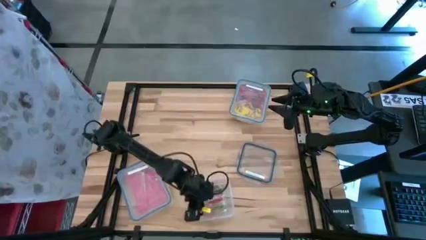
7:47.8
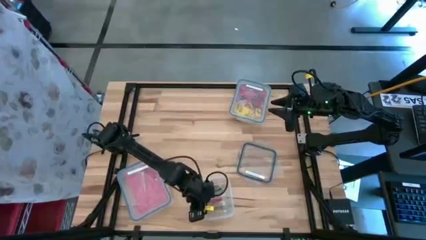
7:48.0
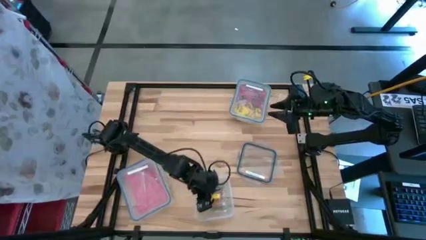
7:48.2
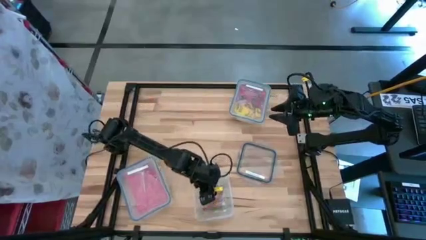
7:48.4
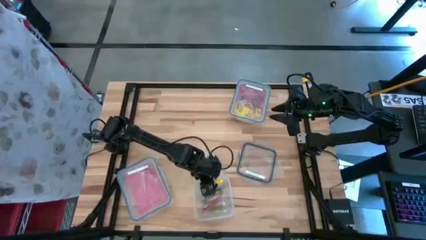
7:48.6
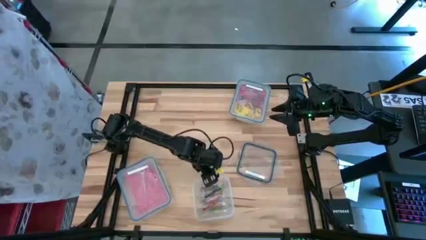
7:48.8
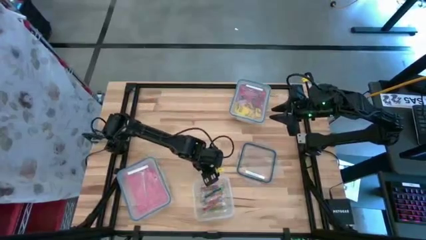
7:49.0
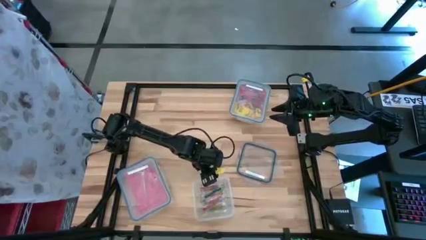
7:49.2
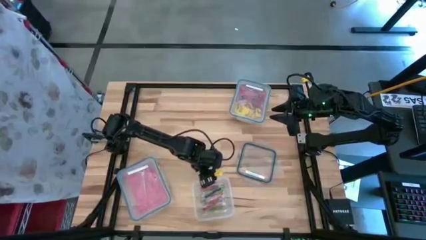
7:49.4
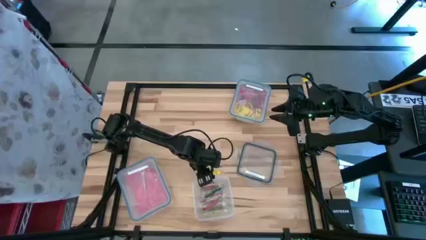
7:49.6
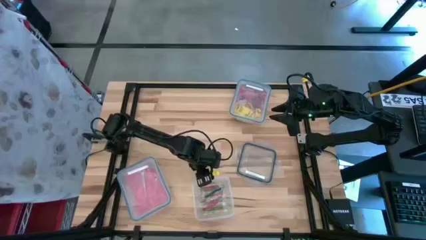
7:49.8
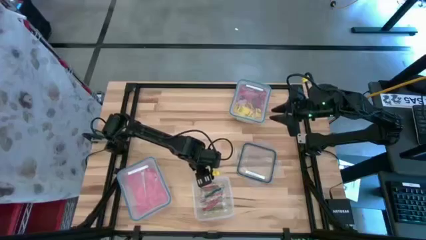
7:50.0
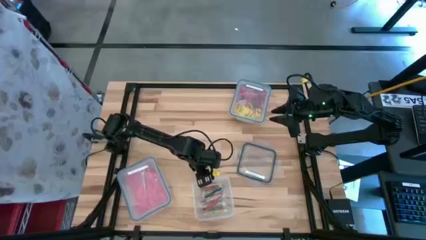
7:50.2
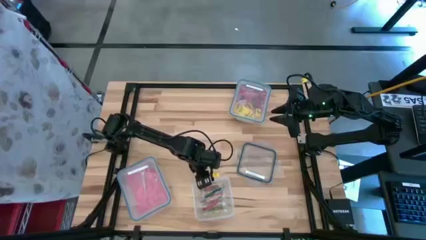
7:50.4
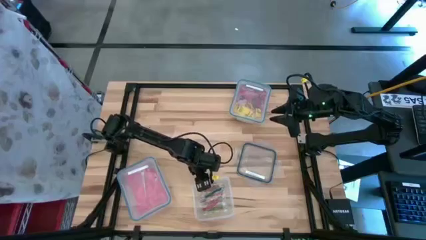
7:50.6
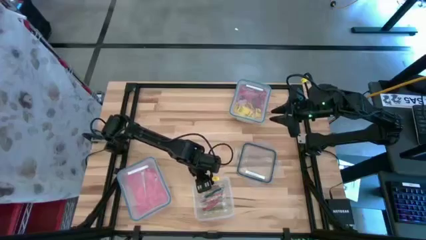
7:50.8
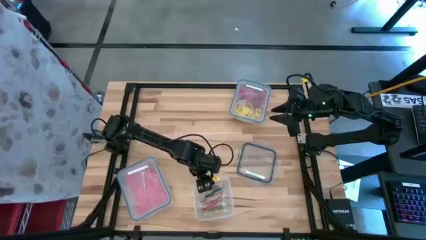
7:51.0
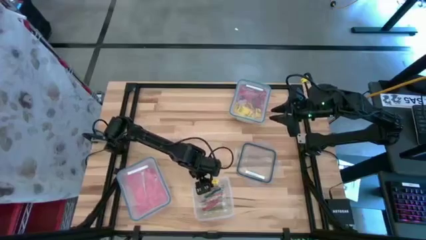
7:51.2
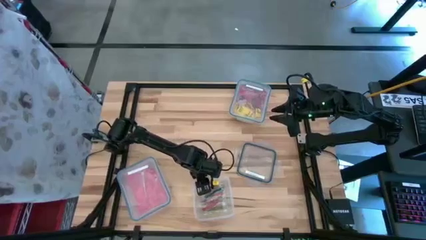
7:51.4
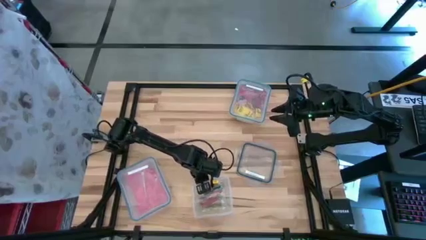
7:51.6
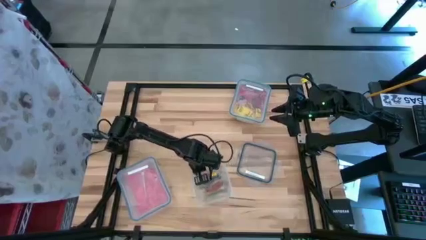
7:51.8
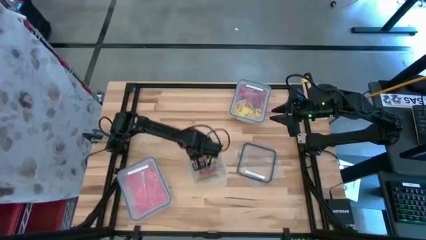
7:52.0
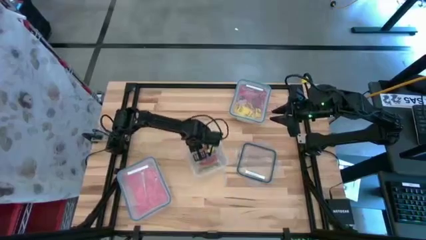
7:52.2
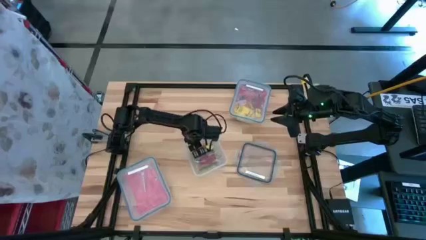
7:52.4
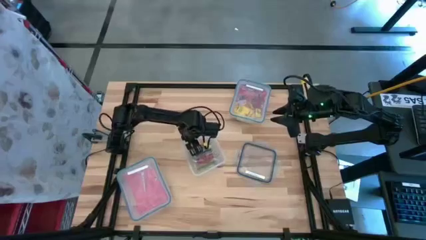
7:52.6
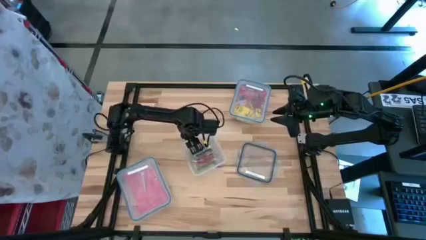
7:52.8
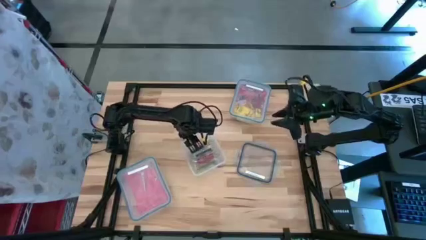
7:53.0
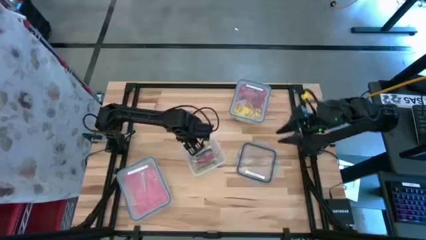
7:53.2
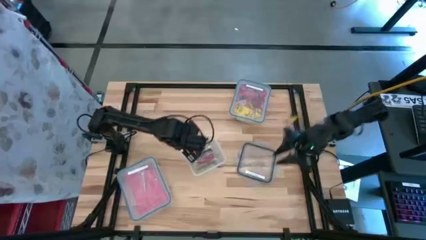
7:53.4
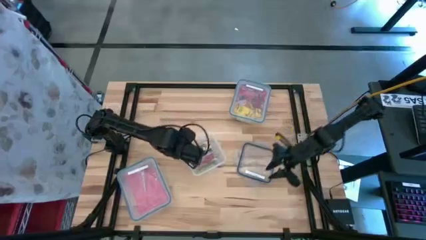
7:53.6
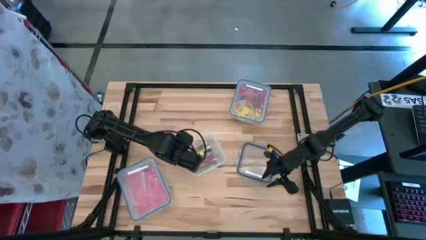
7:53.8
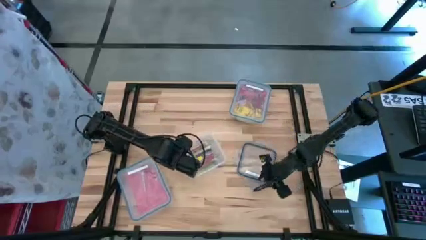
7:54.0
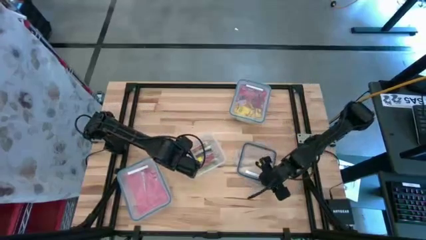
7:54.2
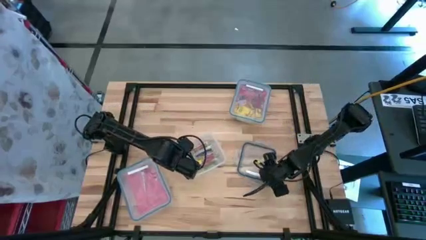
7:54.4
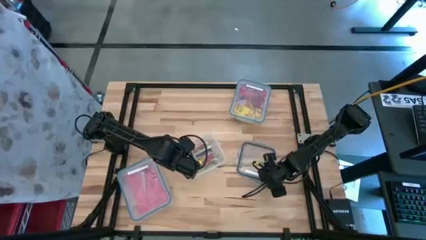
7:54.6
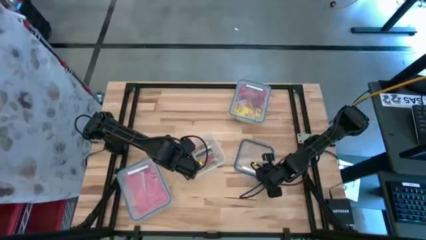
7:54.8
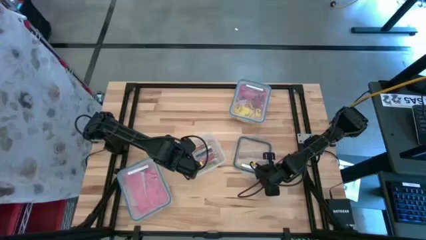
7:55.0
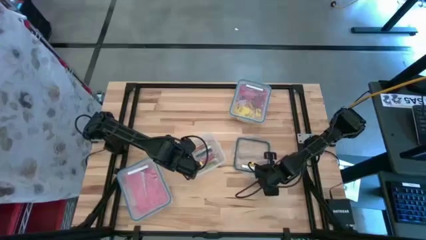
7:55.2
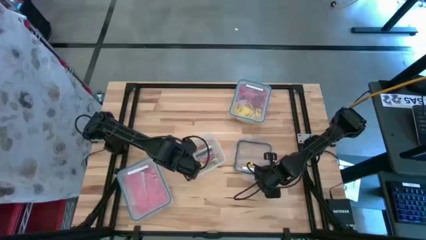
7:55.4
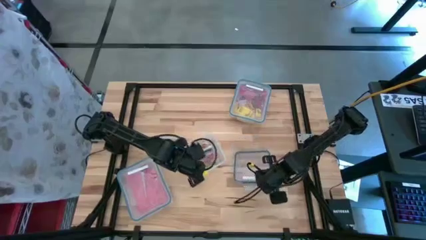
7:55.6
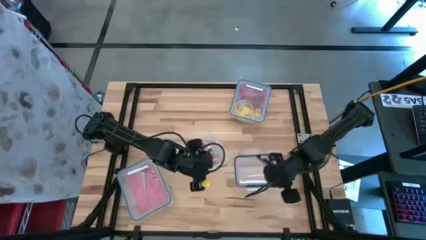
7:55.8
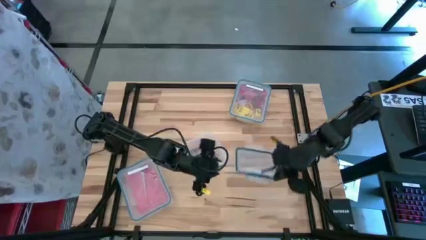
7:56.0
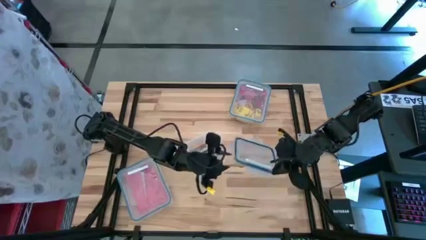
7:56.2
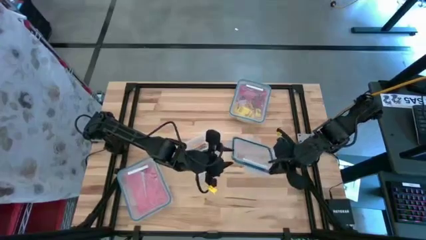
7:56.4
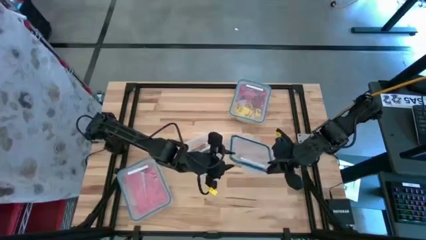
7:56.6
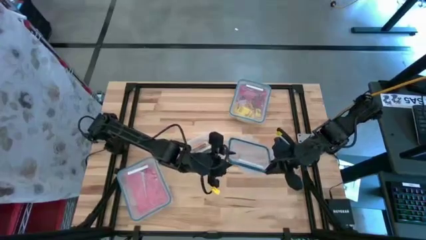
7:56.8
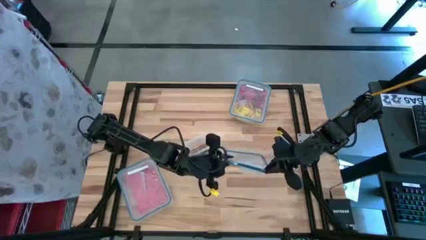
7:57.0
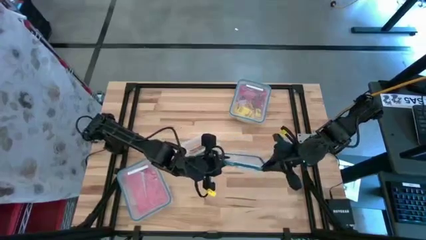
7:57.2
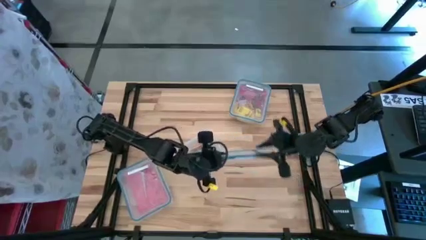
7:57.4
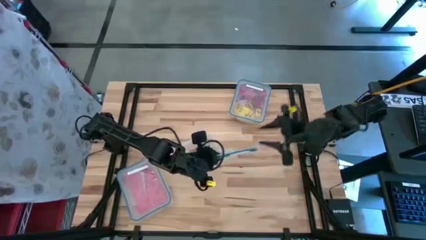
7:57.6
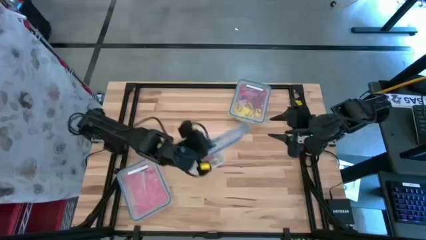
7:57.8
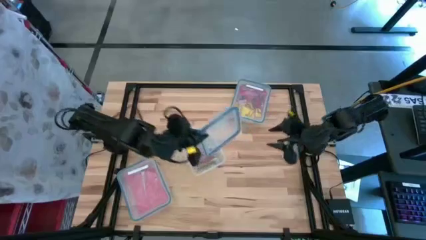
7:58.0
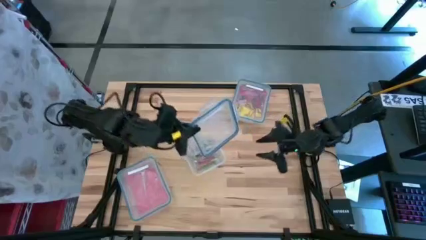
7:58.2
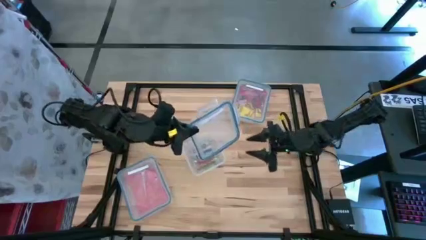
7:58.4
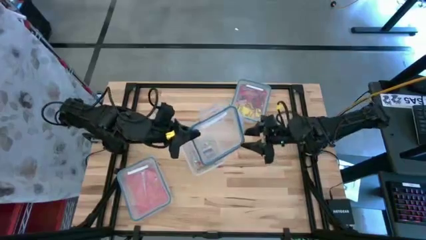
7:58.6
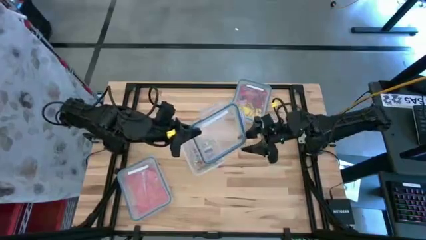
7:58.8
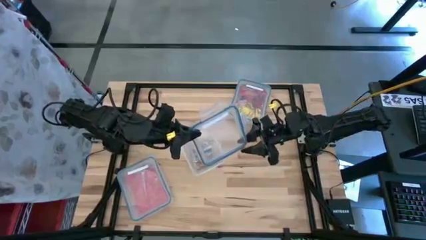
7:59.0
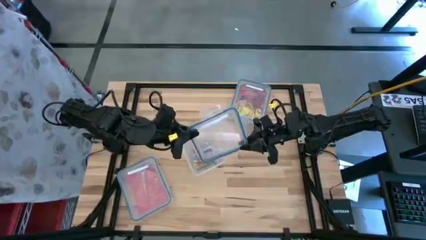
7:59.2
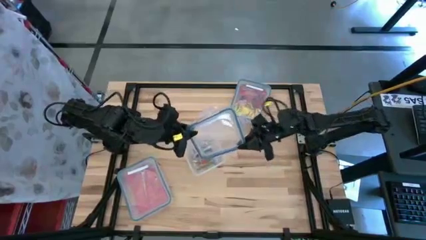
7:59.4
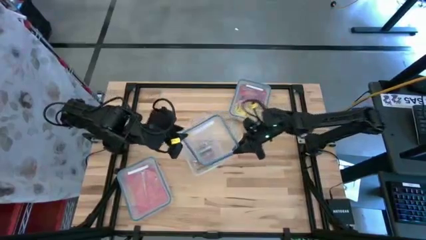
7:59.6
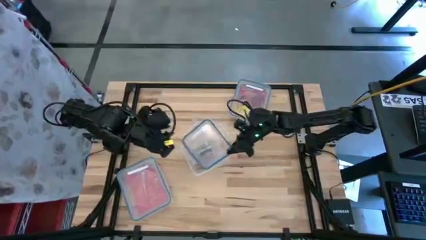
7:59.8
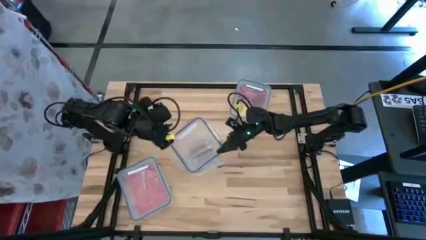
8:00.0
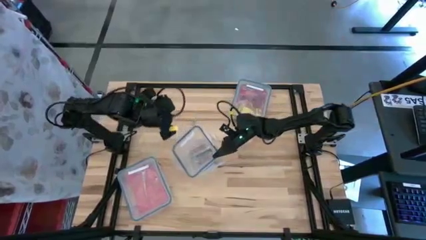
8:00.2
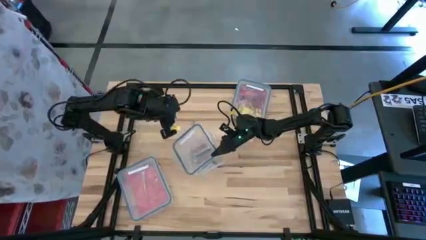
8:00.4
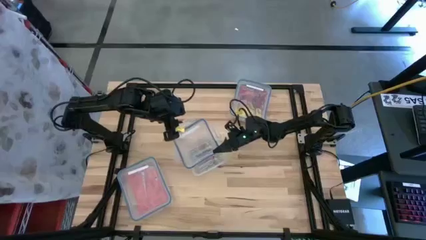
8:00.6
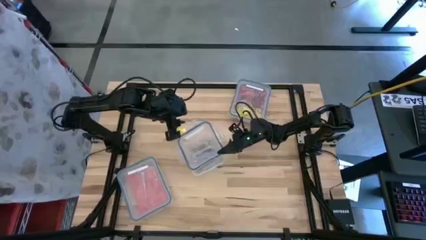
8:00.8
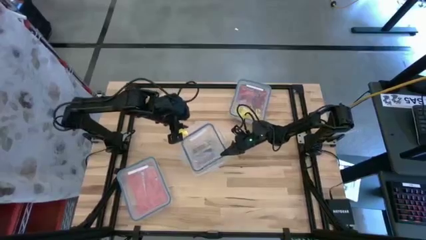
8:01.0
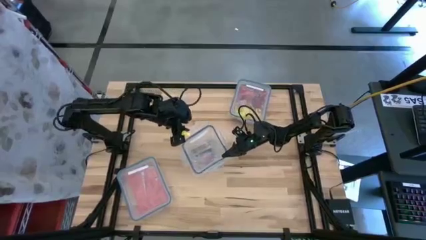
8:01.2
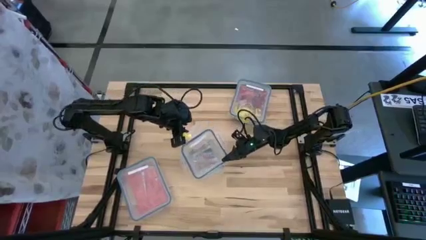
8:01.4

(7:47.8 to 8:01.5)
Task: Sort candy
Close the square transparent bin
